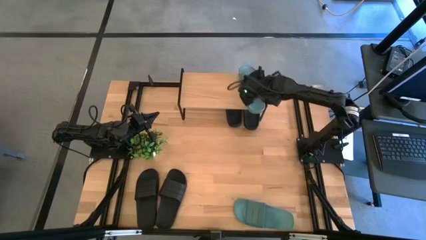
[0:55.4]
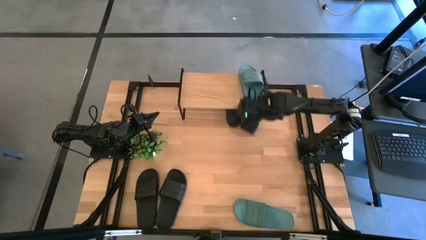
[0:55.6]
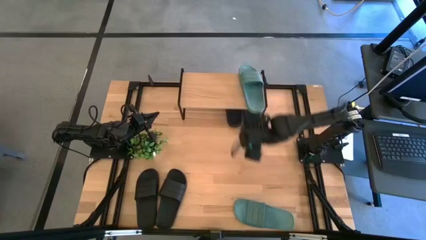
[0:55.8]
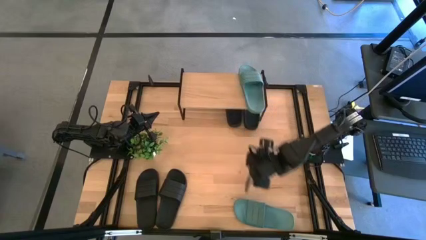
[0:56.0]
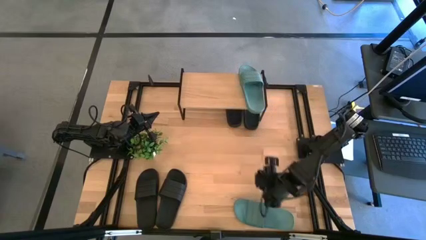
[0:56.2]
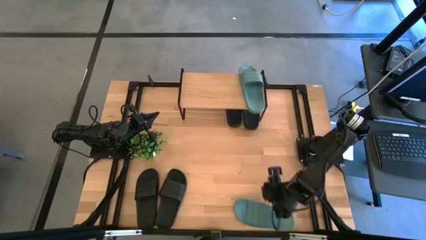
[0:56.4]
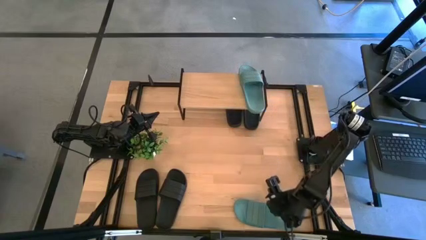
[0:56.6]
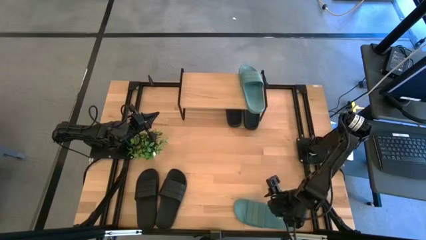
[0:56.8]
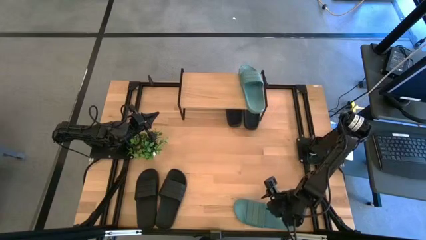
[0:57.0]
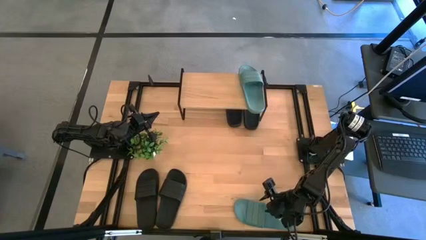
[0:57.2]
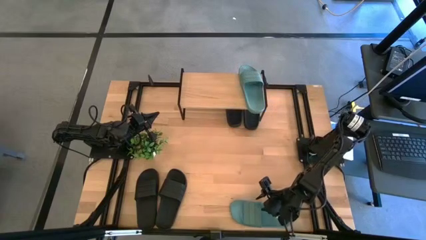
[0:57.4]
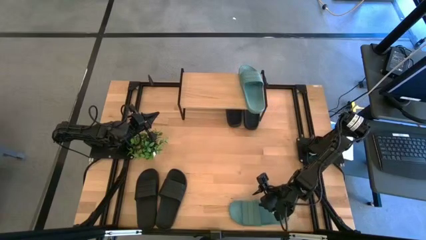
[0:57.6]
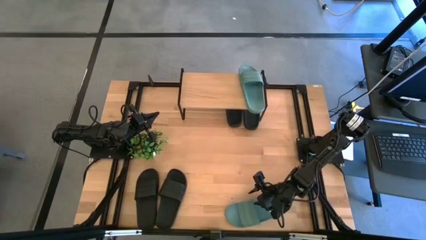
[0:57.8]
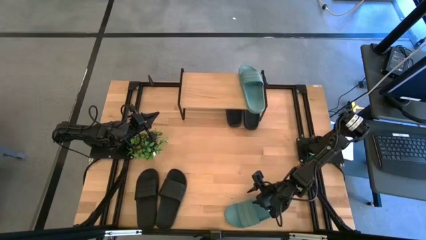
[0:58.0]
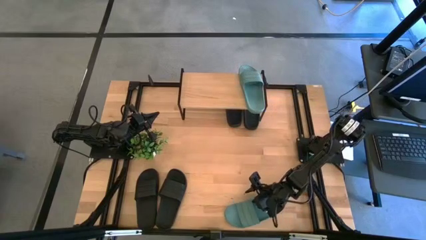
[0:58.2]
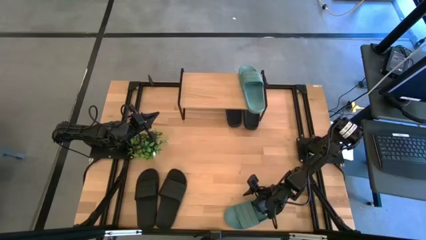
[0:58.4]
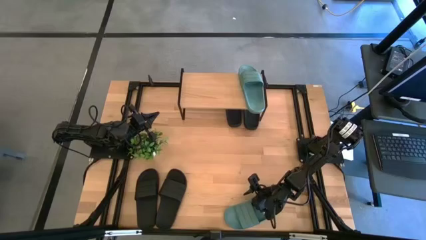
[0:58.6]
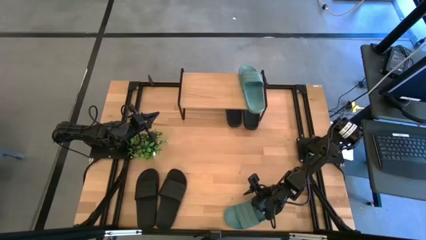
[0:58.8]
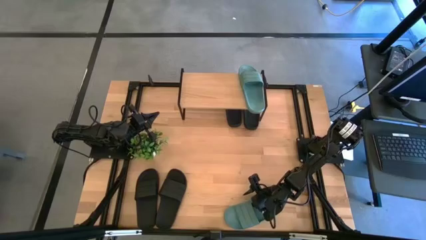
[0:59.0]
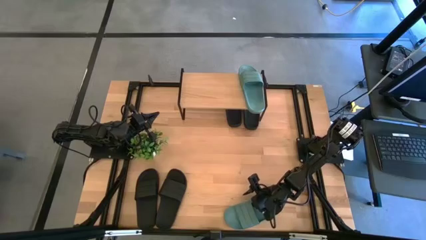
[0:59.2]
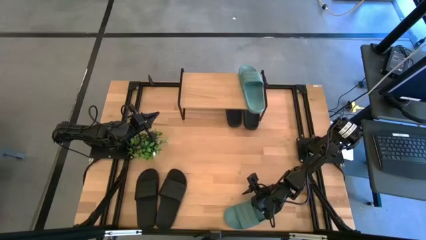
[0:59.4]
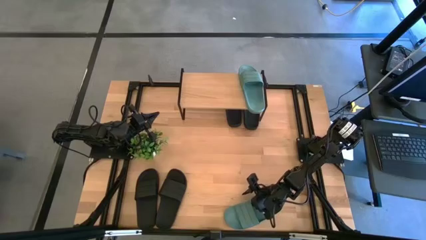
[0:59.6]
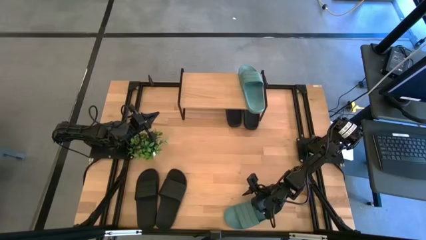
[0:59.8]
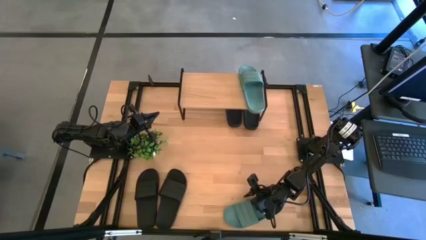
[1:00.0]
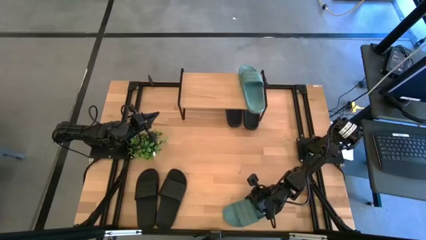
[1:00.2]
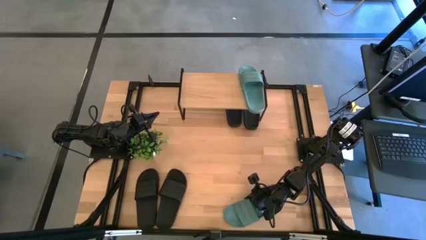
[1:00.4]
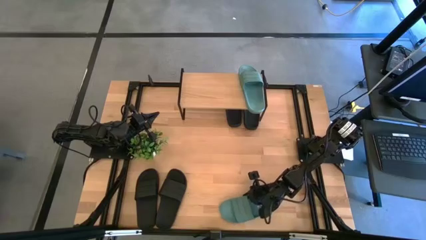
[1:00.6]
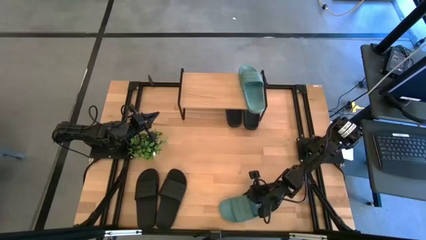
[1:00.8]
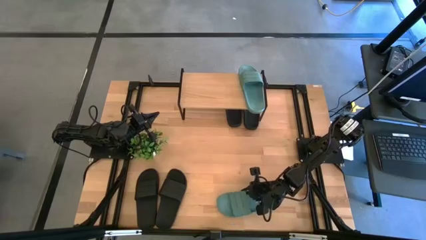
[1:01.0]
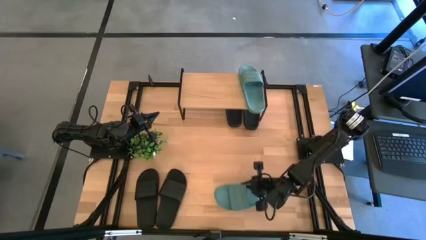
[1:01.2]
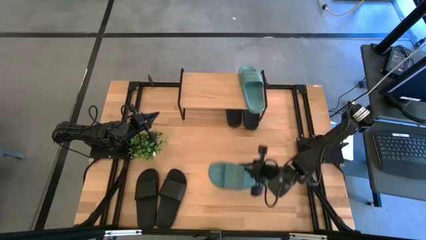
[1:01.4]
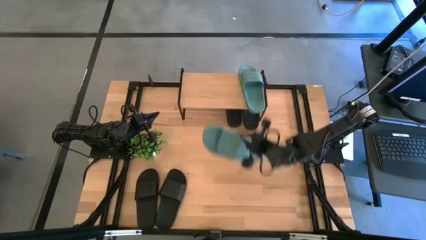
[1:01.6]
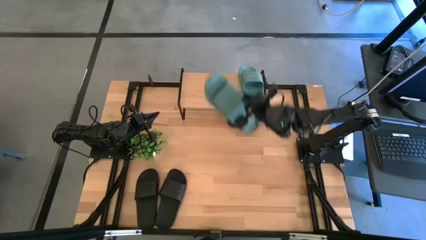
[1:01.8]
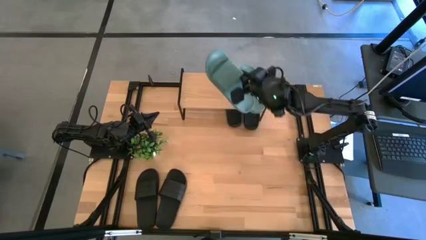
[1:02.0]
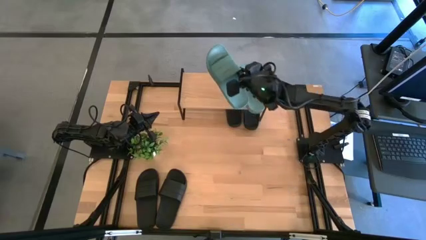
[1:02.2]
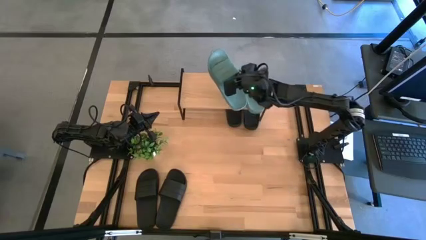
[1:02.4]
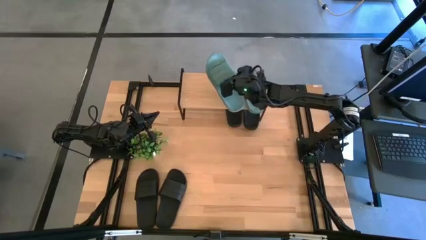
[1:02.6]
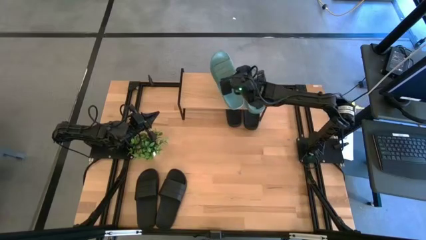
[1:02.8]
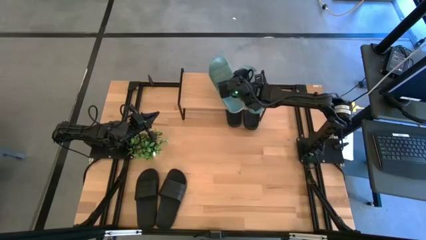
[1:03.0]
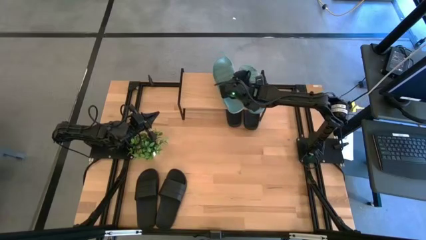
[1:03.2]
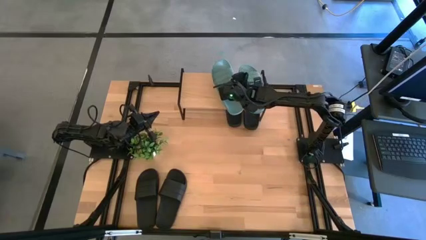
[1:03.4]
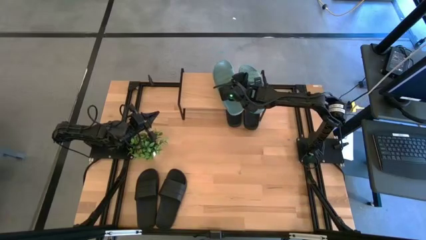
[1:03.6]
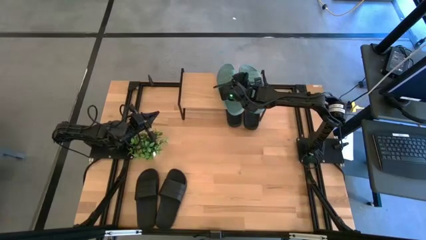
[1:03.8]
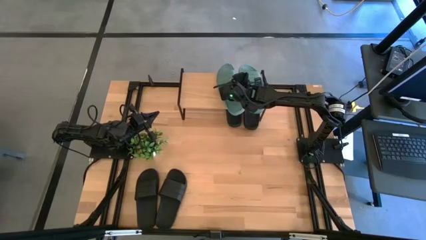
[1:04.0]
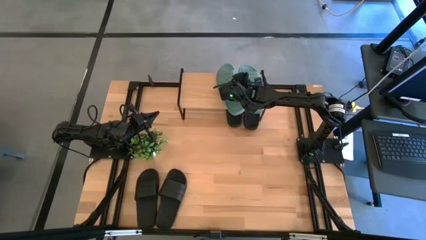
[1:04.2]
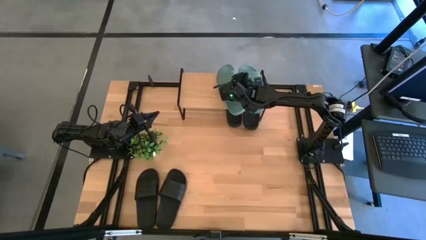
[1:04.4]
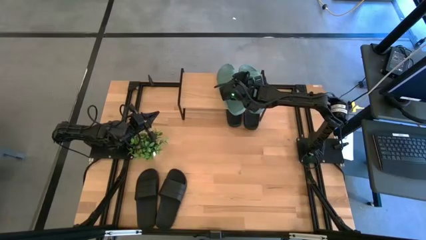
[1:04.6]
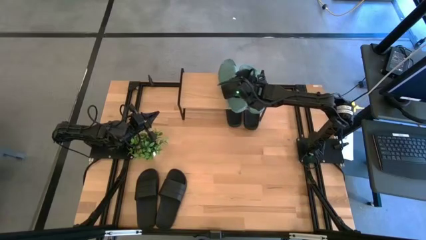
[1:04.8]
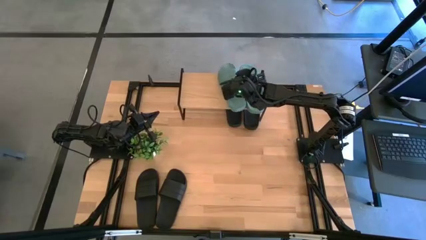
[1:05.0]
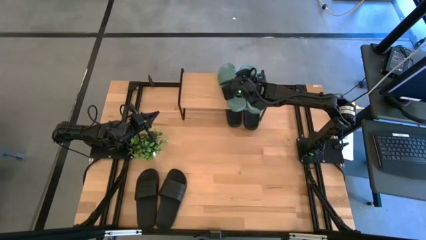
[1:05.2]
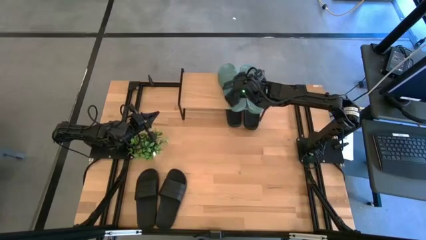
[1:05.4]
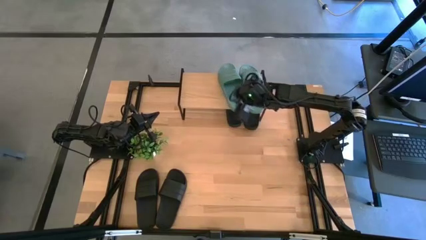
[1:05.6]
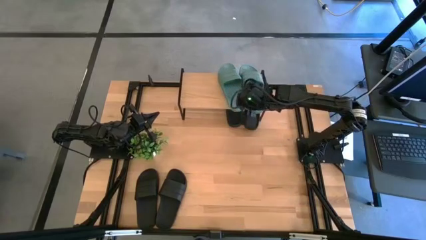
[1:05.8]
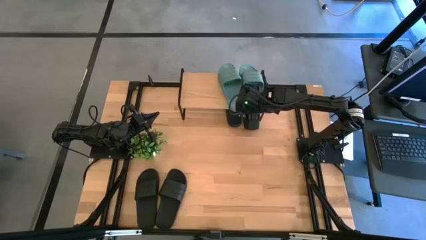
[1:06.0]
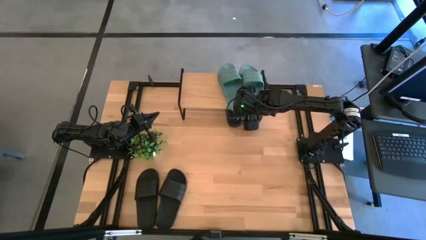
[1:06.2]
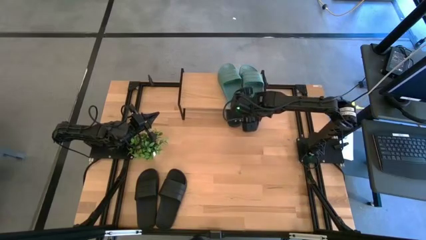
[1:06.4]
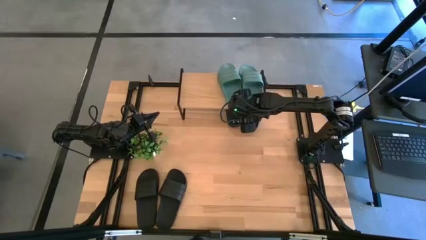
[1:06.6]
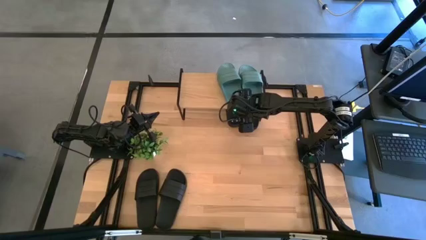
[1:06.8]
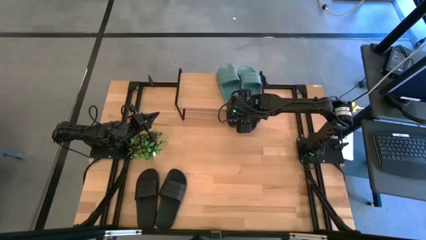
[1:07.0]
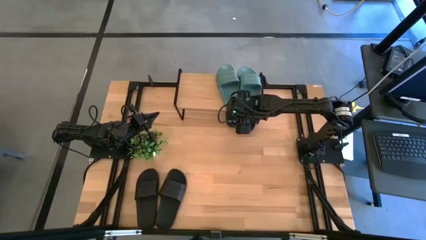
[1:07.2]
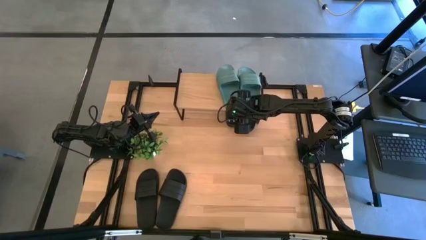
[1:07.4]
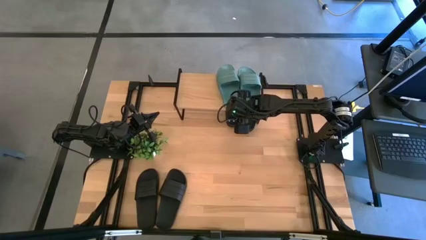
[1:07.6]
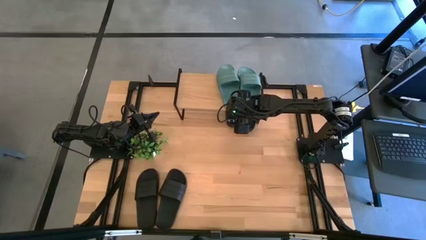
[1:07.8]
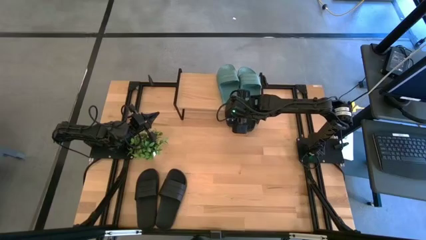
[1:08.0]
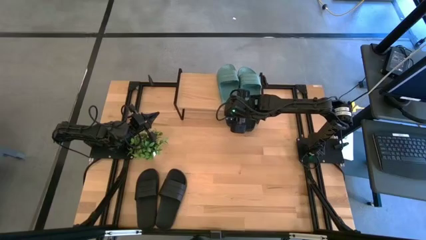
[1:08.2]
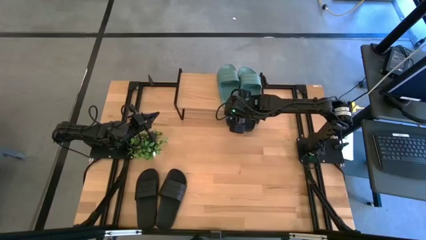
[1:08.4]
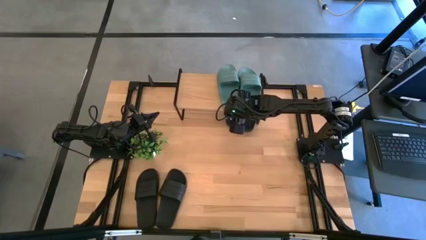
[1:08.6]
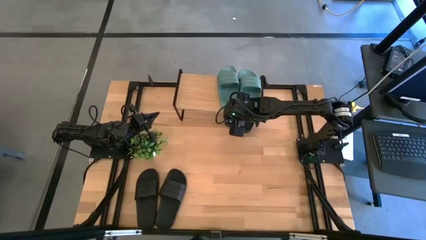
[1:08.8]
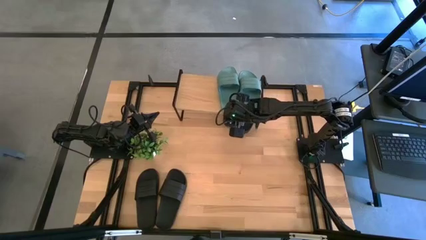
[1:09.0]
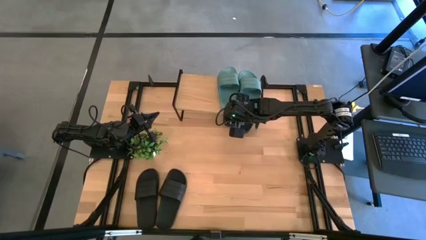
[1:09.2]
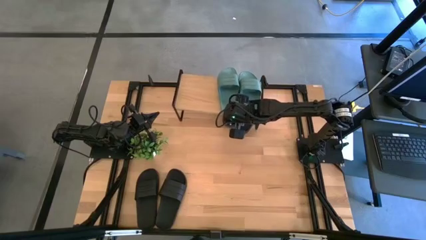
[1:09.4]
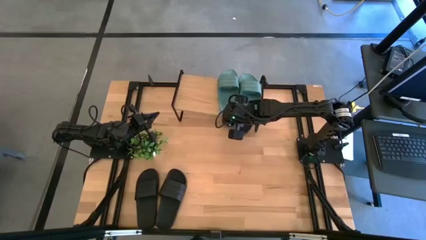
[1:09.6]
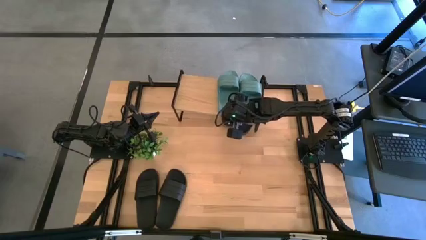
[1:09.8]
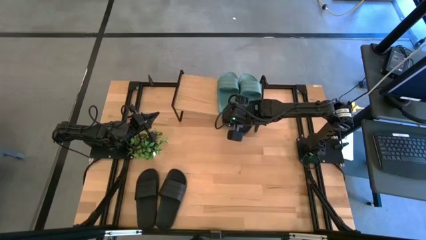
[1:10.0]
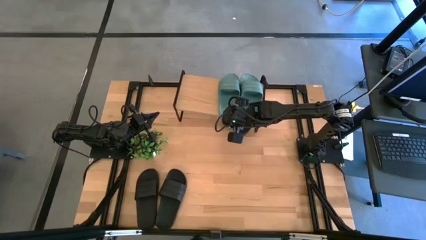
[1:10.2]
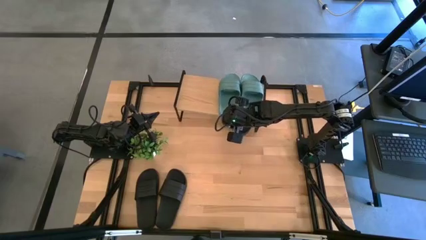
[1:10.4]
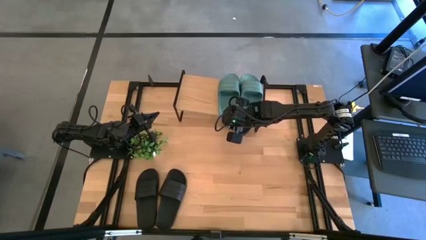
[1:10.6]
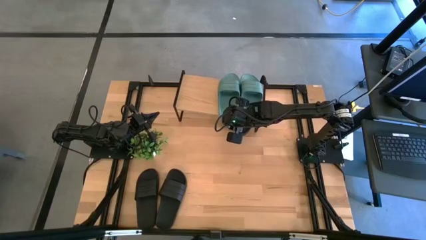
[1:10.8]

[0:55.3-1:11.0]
Task: Pick and place slides into the shelf
Put the green slide on the shelf

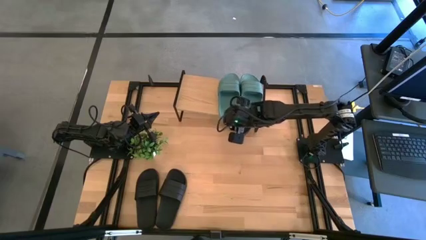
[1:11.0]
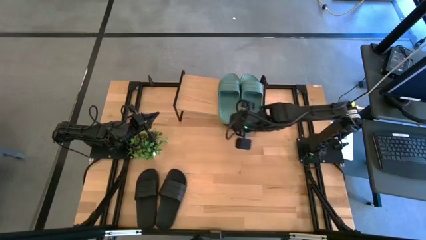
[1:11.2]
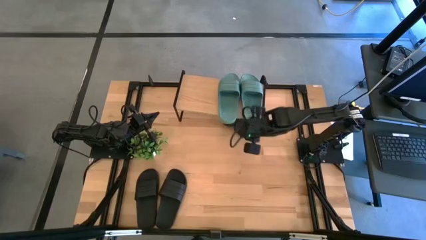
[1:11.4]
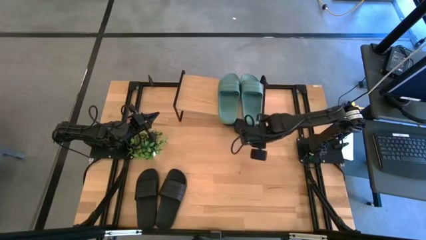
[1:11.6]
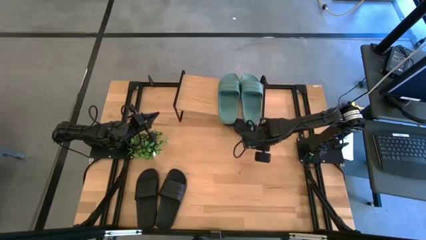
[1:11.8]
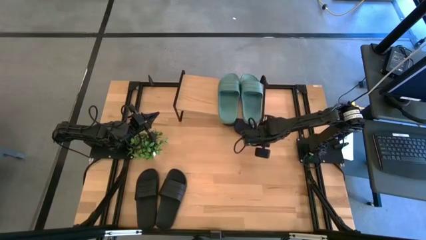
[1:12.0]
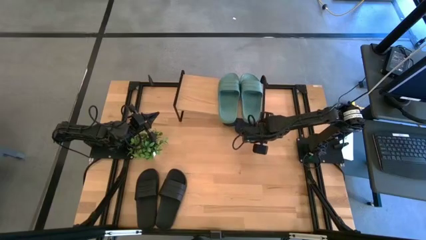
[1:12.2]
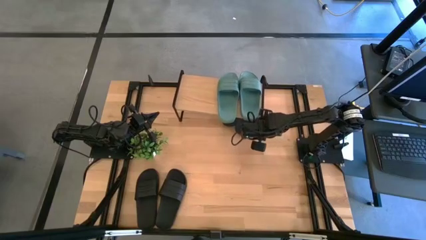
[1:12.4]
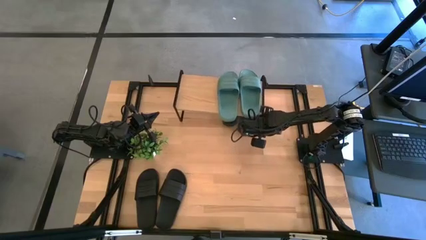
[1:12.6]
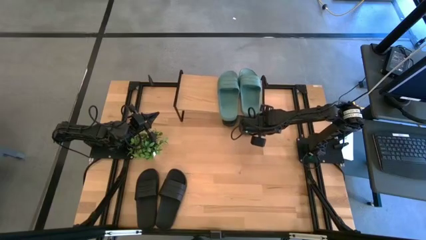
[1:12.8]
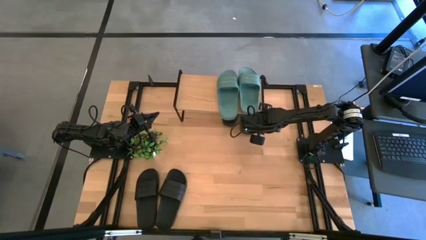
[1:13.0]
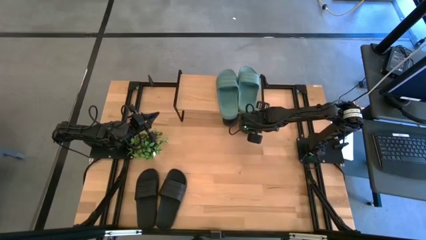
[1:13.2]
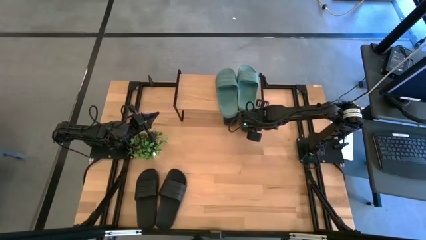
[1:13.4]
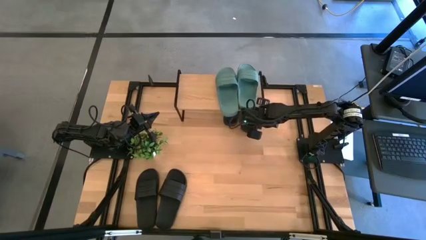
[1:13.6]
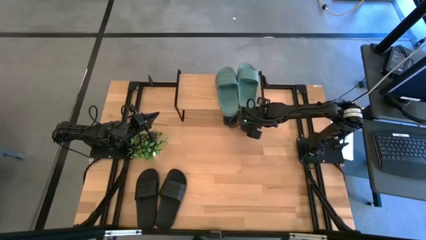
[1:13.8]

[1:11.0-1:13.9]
Adjust the shelf
